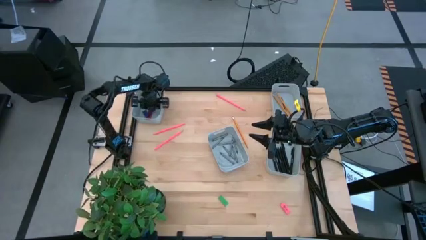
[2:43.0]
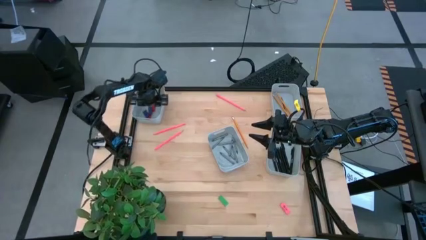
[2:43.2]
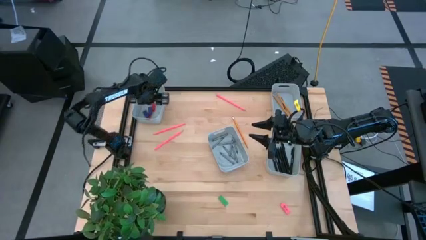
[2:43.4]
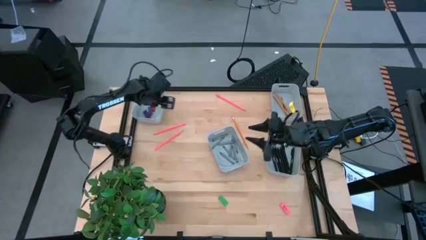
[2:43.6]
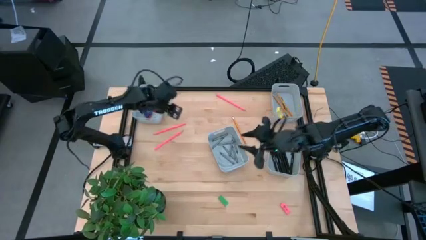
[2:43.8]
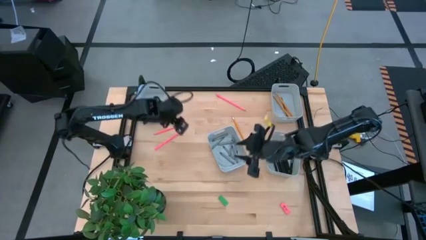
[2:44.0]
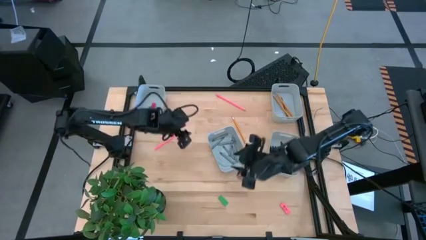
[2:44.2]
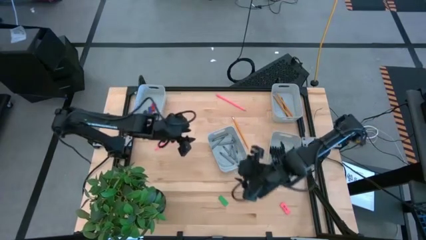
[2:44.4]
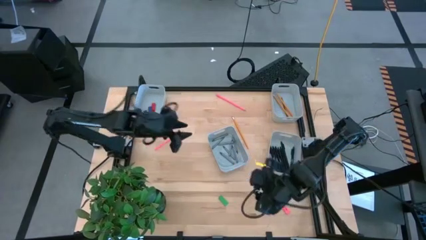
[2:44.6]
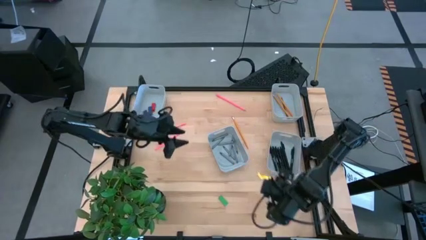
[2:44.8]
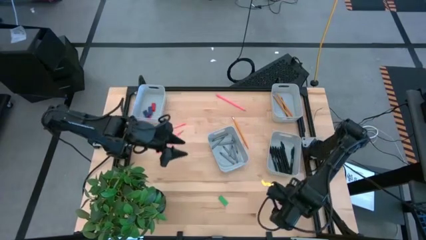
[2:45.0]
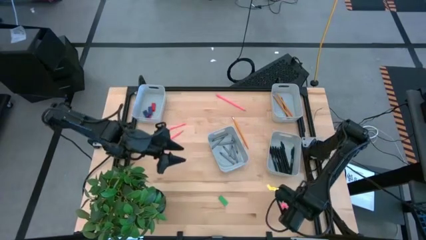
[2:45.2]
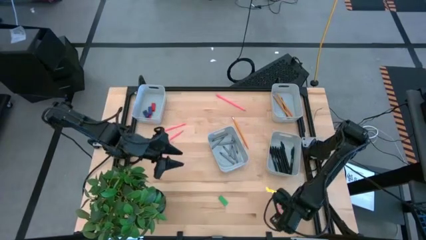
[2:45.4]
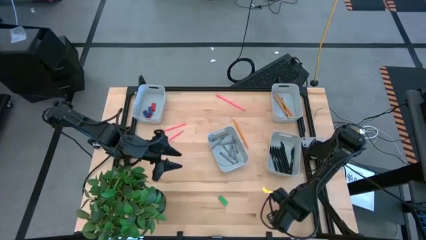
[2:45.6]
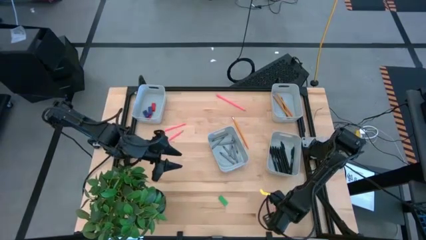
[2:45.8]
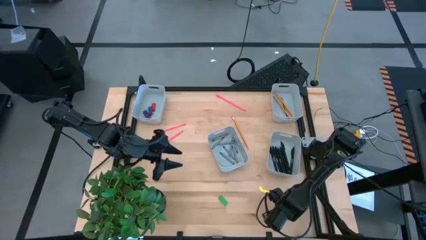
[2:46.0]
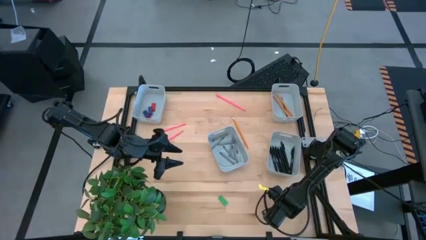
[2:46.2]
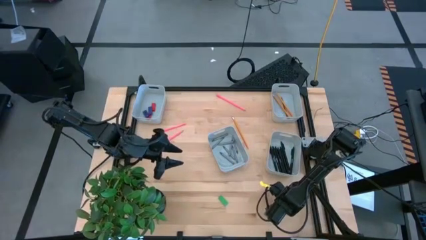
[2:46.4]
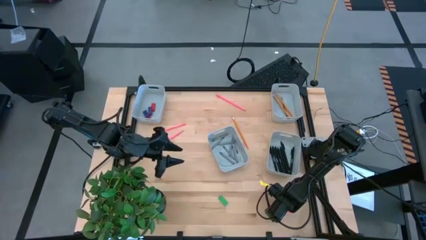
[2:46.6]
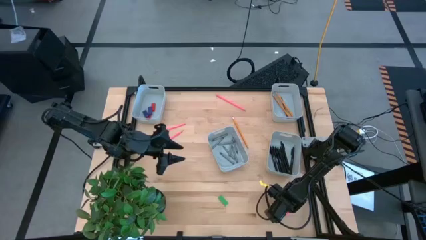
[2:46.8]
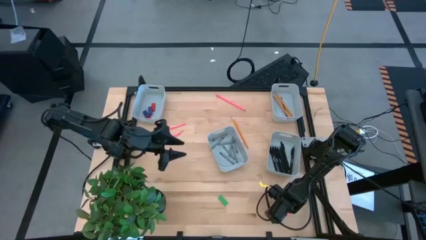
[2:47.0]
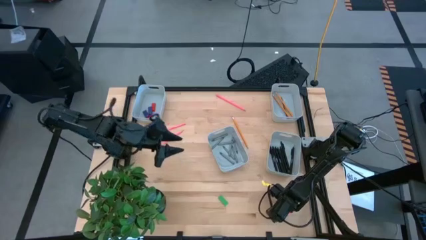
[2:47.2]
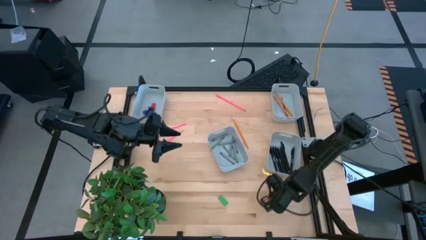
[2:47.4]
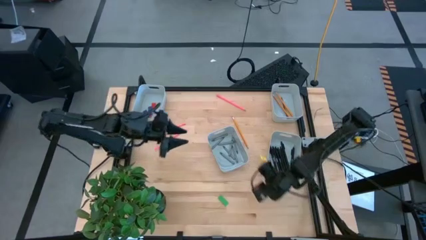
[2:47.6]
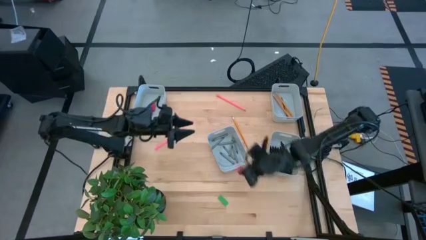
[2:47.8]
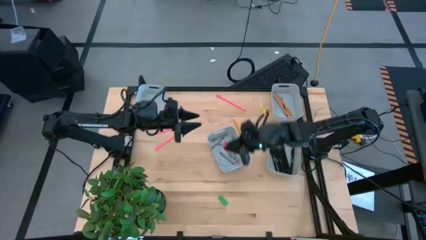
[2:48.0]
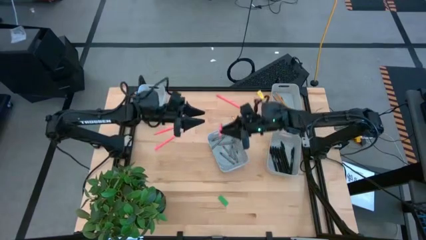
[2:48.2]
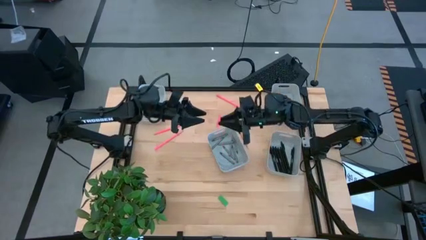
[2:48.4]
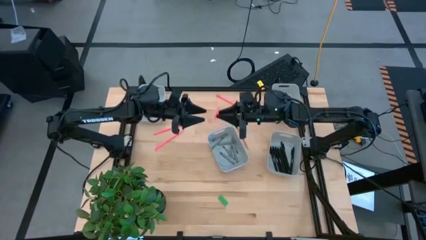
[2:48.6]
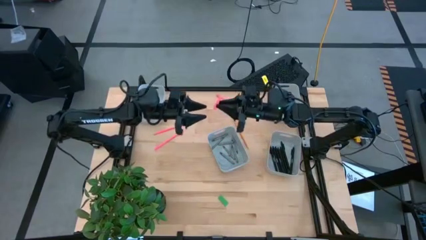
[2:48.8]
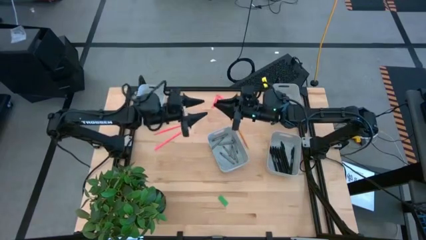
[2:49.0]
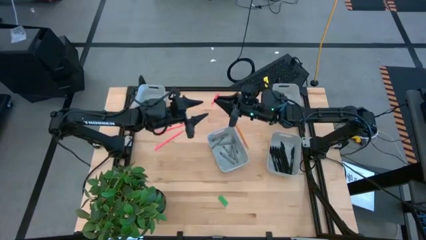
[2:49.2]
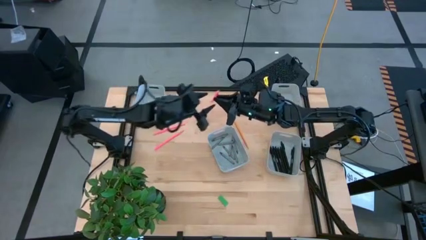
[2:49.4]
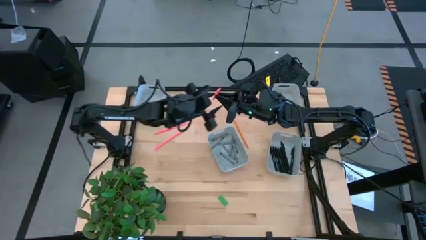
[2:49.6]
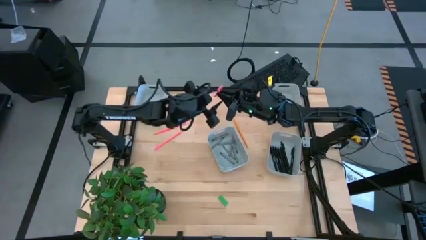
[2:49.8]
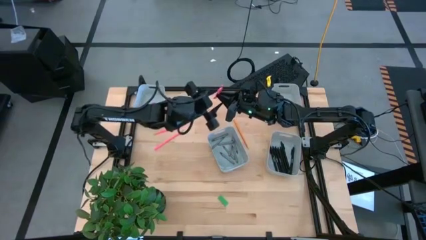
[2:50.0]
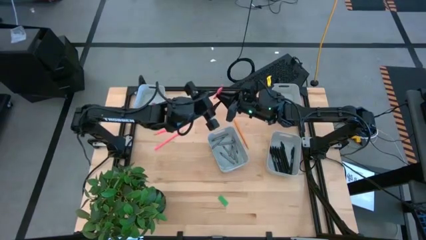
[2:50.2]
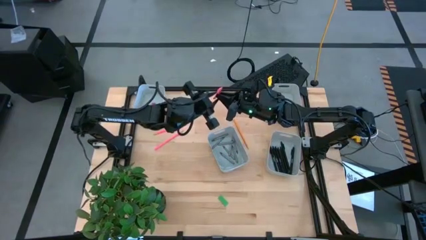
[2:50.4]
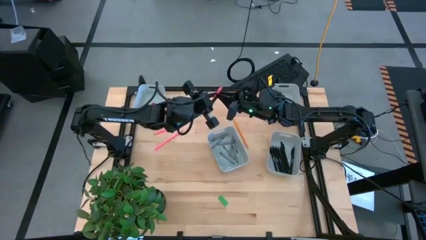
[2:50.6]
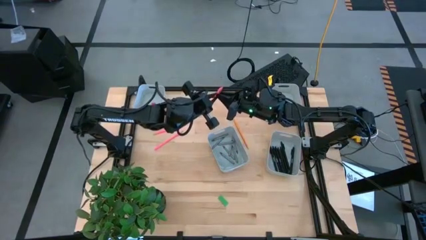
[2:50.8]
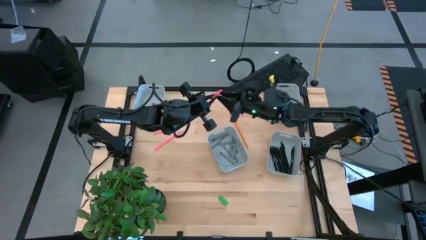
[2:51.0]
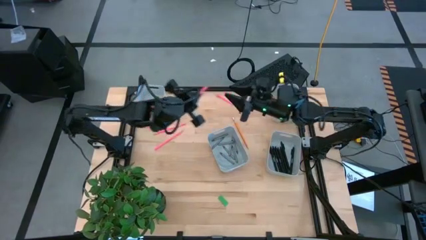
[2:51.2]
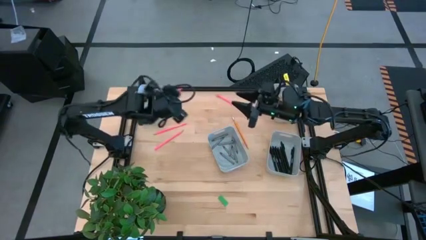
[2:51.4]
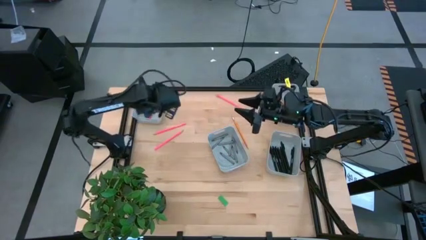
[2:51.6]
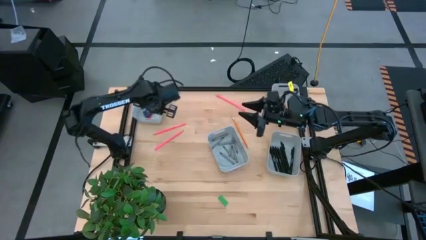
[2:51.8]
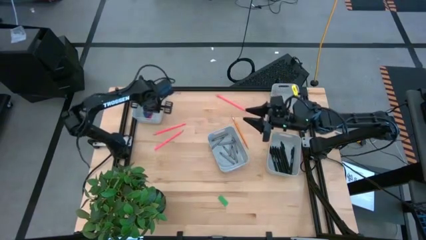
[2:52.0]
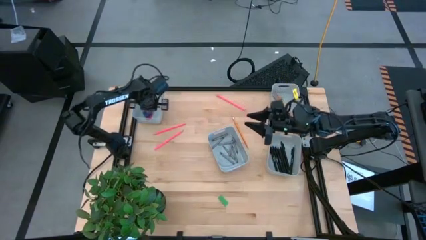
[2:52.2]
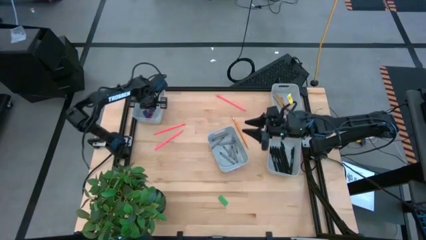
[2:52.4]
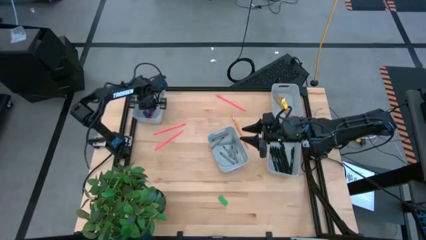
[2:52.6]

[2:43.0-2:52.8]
Task: Sort crayons/erasers/pens/pencils in bins
Put the pink eraser into the top left gray bin

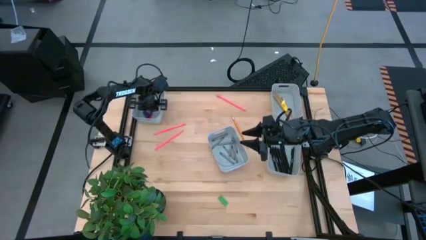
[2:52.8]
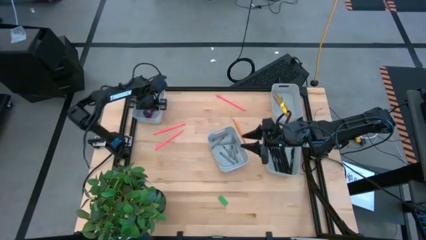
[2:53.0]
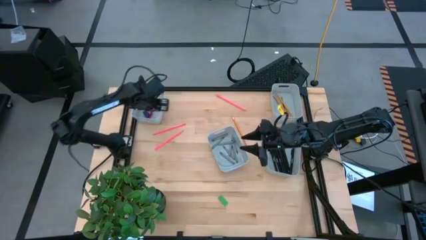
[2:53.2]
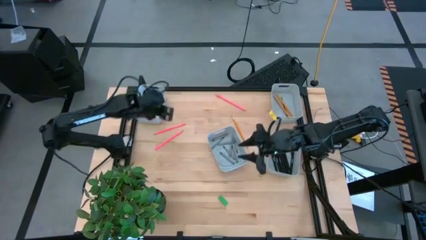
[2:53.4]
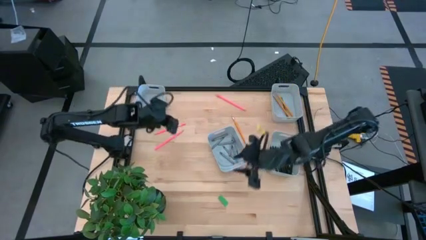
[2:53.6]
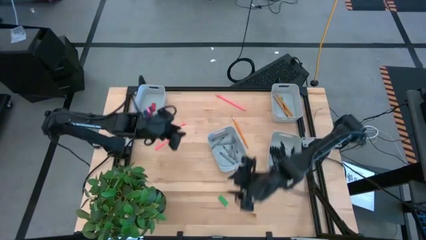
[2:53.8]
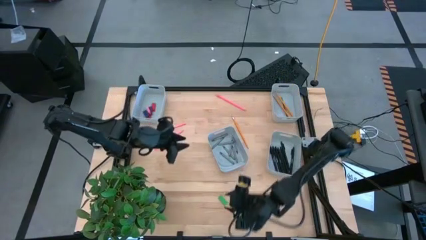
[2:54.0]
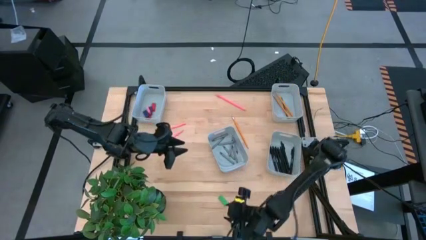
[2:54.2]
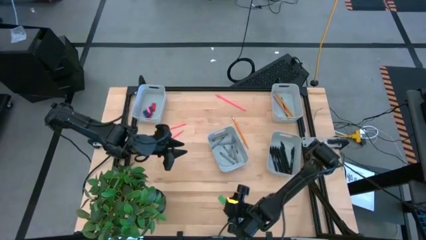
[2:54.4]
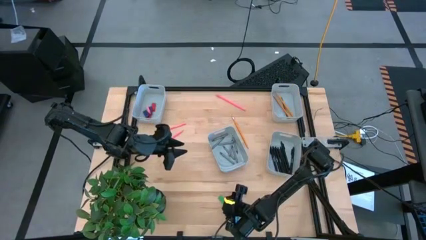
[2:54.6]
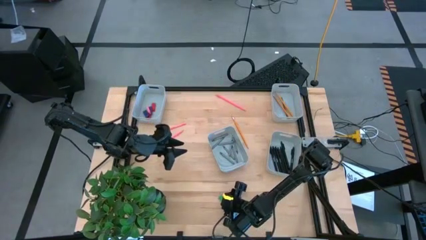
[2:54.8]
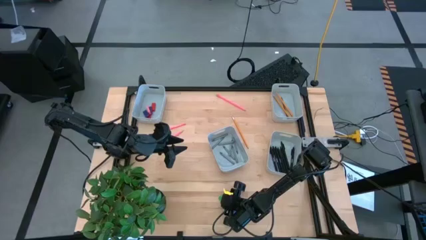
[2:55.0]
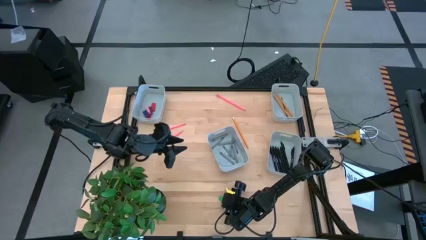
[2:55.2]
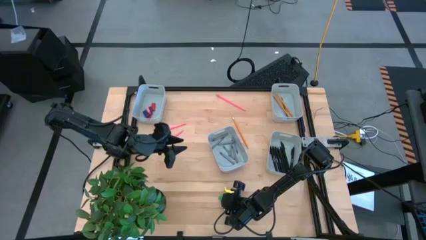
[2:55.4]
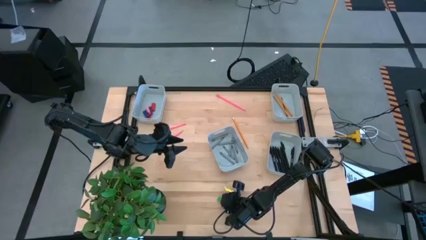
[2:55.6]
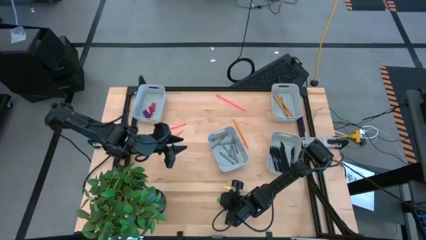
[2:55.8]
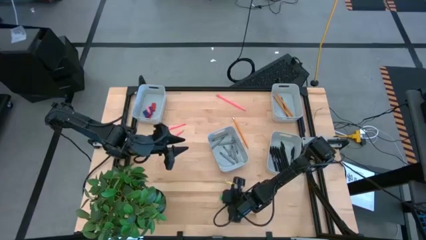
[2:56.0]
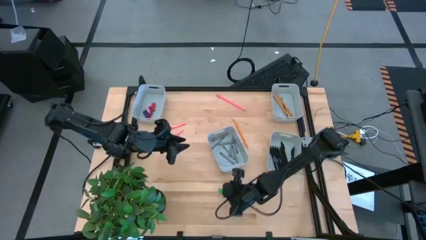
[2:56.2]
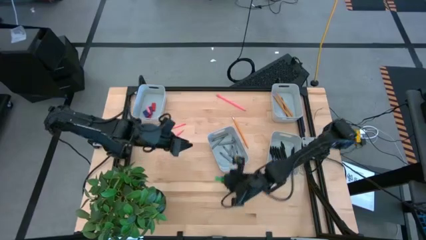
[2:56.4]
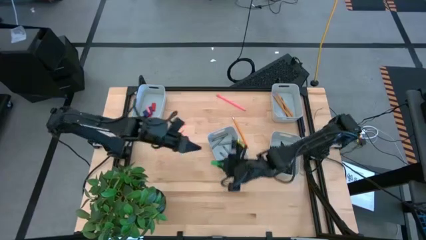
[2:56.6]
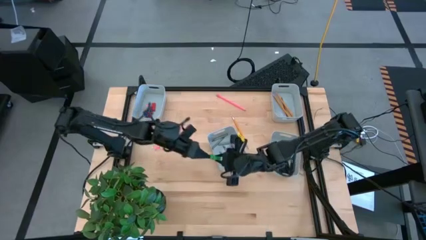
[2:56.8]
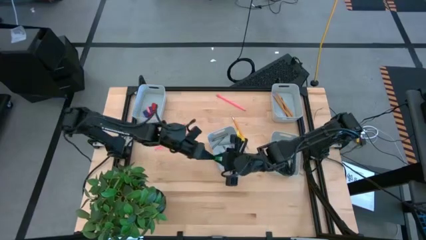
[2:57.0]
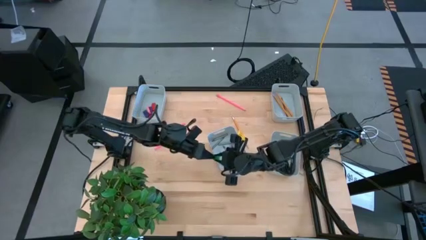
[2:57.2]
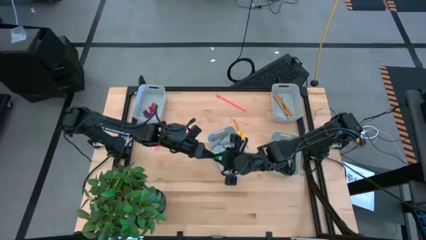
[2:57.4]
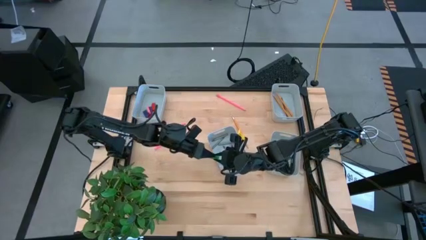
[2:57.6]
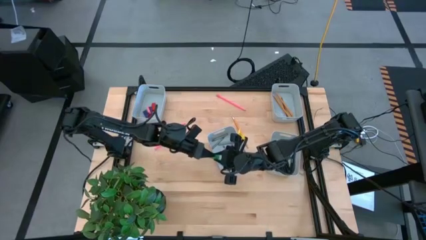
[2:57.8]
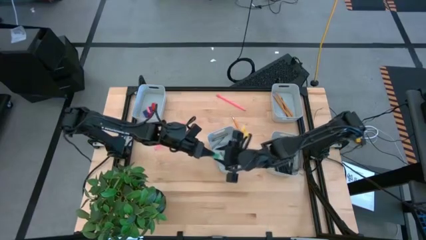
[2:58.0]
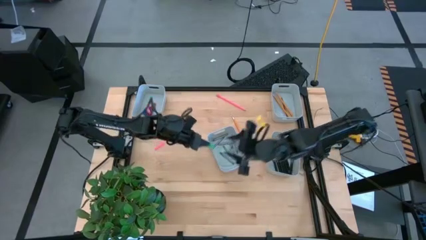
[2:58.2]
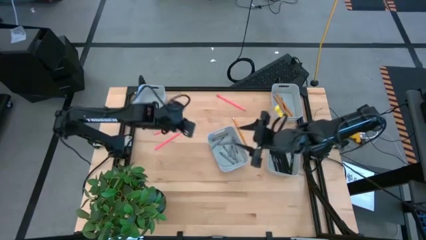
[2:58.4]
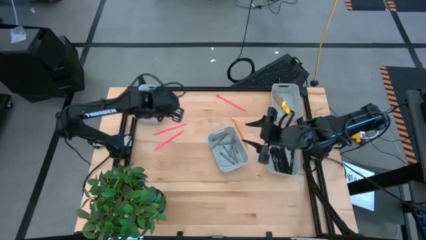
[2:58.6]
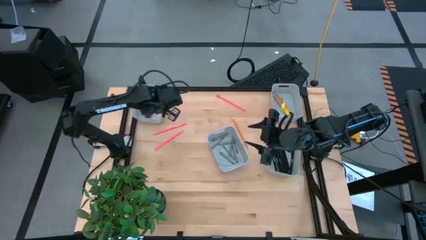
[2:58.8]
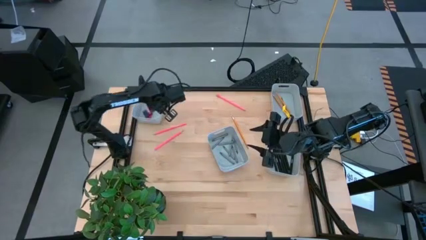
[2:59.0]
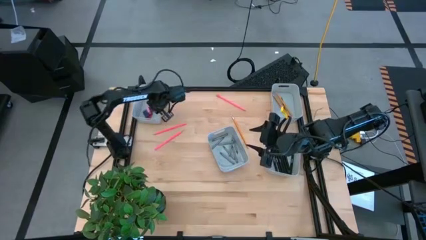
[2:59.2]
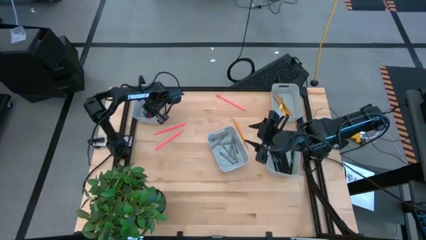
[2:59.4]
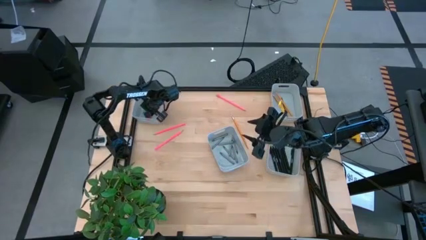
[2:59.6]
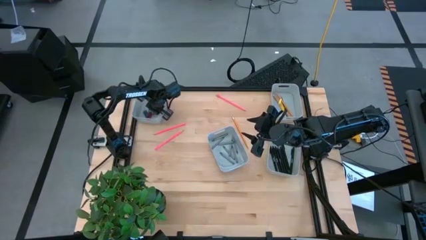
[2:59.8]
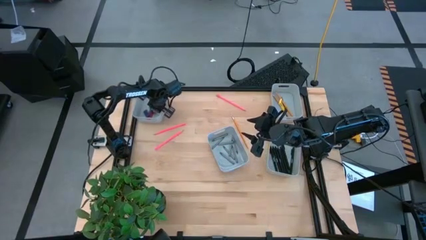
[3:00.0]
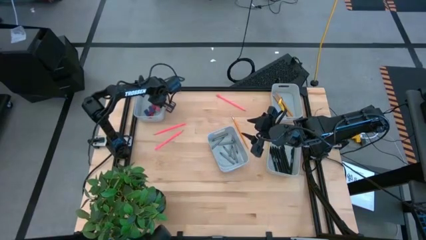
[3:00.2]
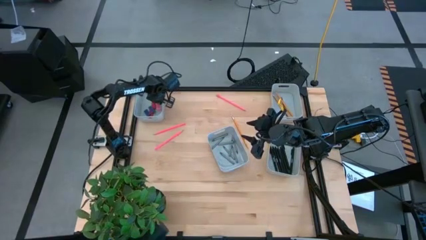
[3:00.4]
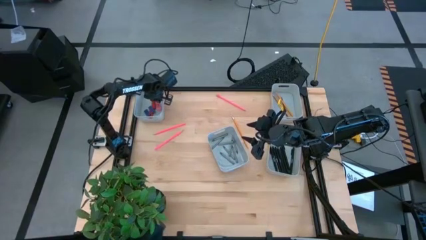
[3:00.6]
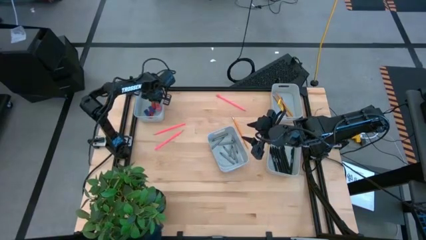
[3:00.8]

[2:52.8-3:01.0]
Put the green eraser into the top left gray bin
